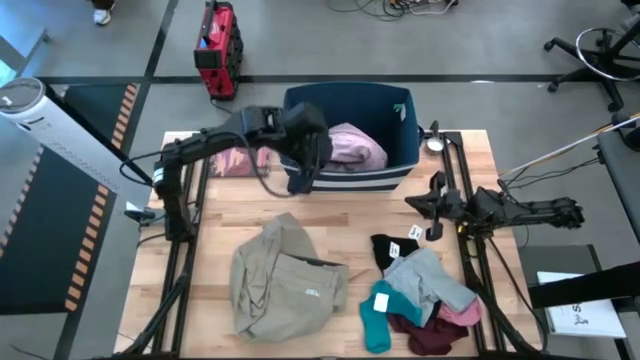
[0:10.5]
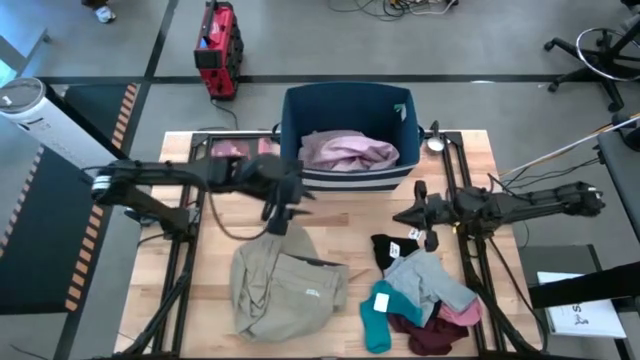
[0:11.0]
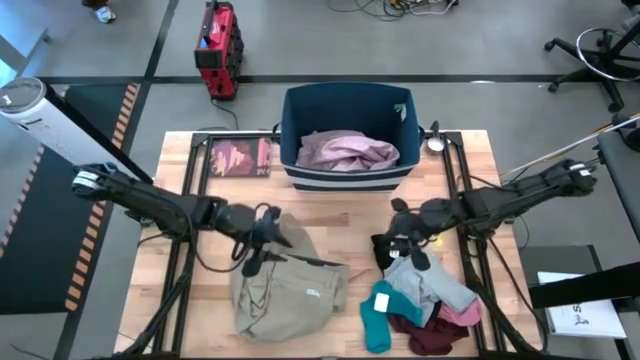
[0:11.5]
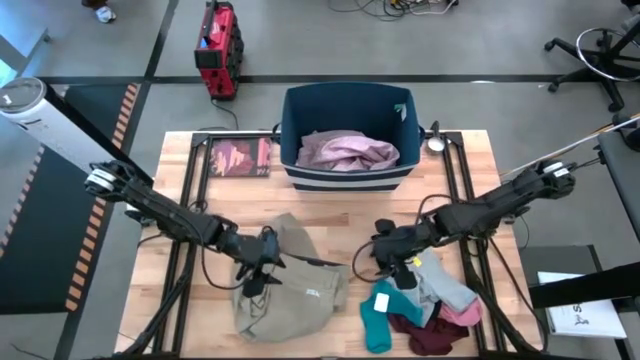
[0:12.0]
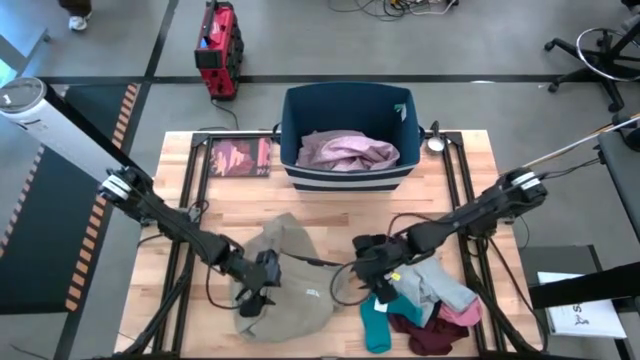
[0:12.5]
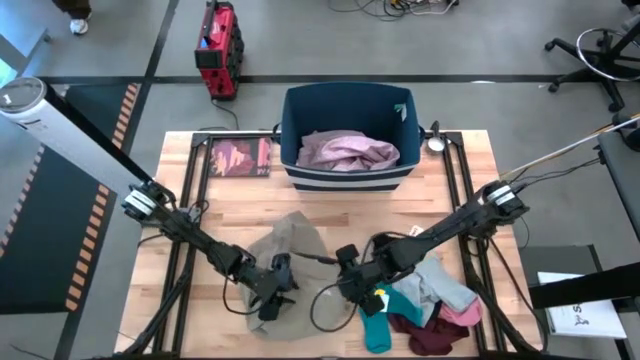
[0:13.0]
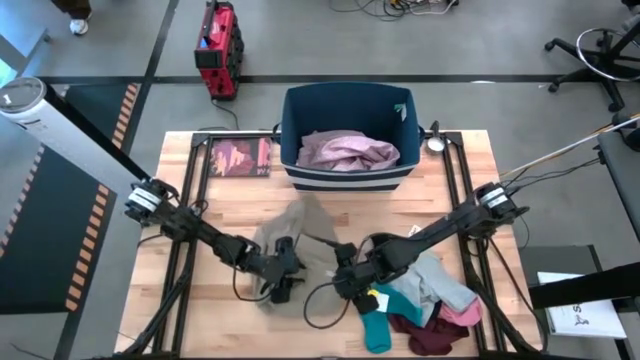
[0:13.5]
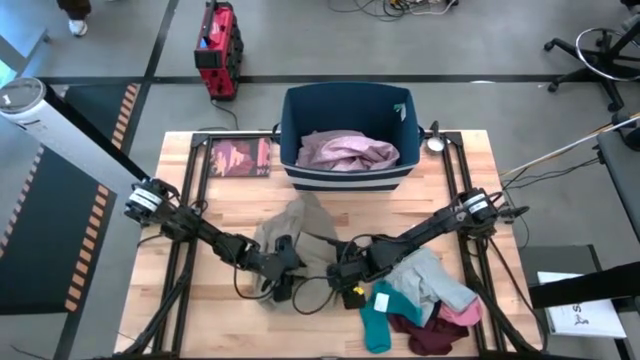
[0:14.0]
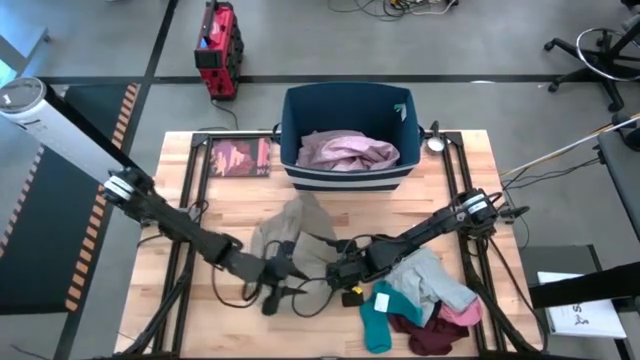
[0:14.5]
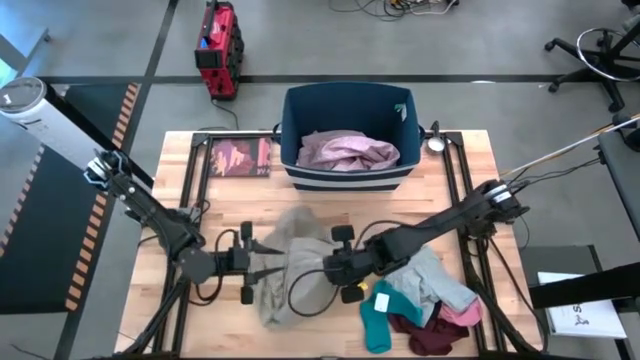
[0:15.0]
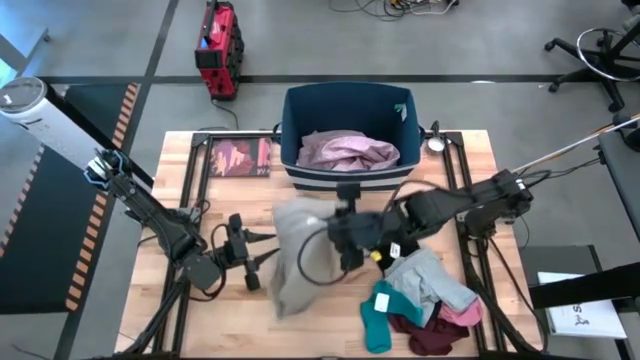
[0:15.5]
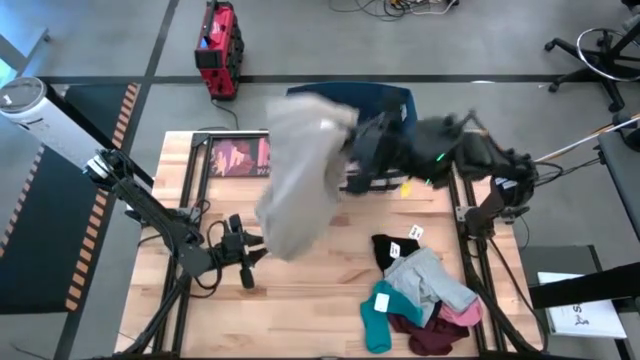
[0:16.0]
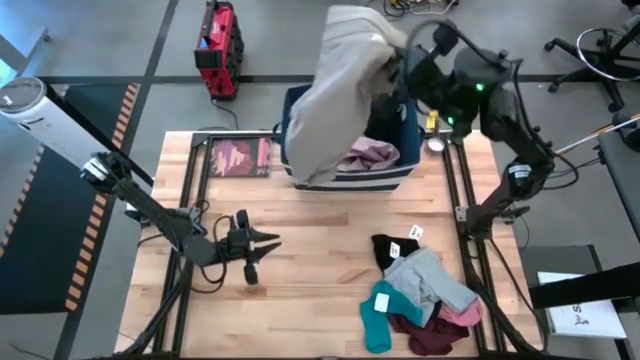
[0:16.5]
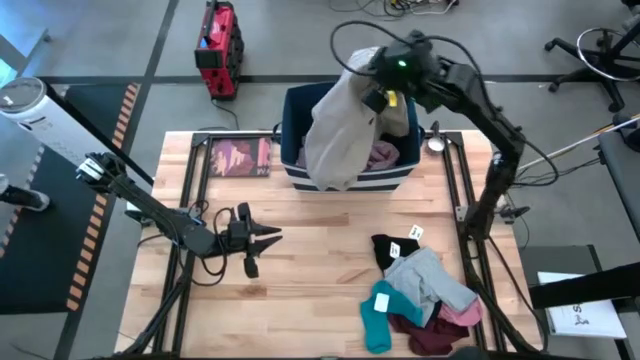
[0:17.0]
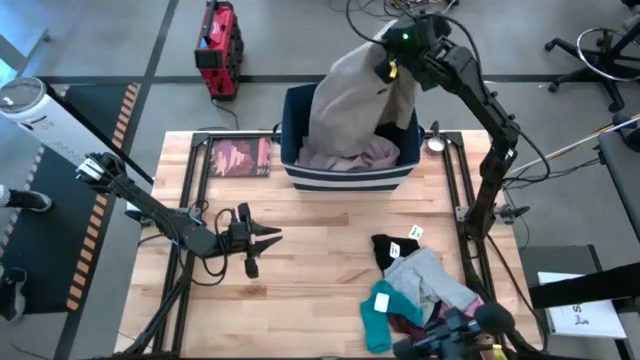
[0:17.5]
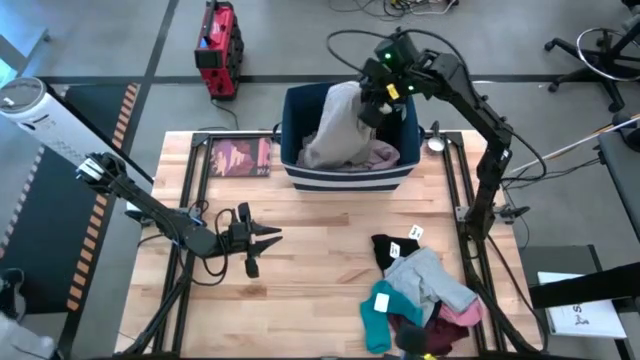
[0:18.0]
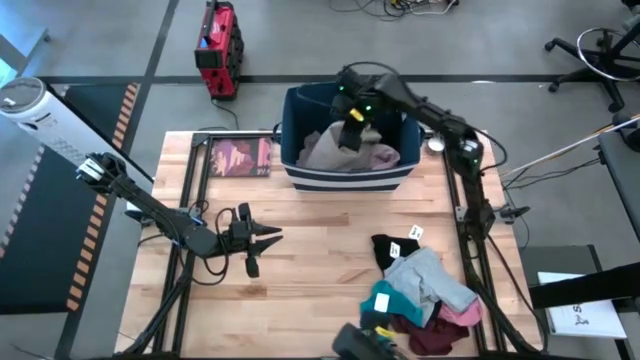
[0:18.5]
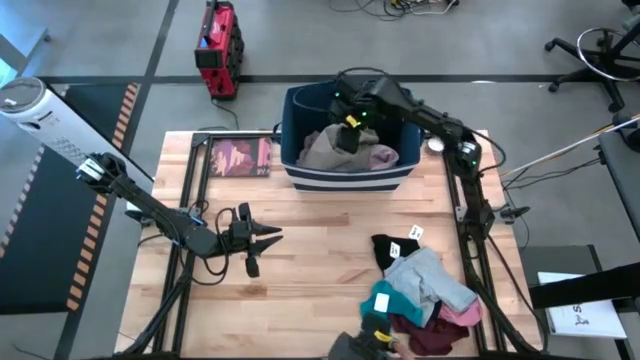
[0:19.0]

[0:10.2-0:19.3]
Task: Sort clothes
Put the light brown pants into the blue bin

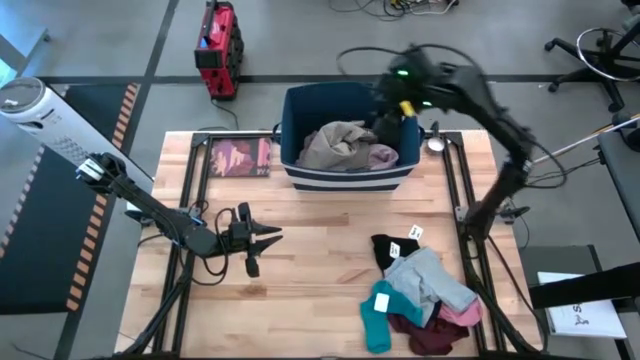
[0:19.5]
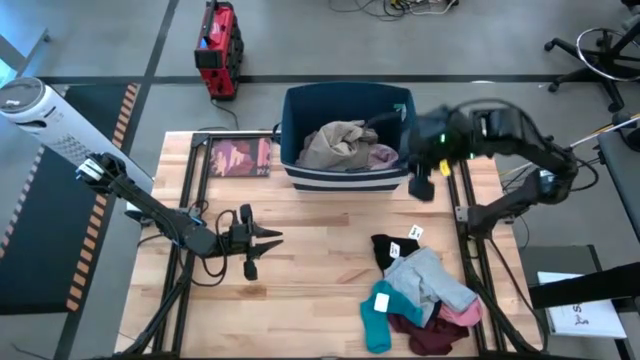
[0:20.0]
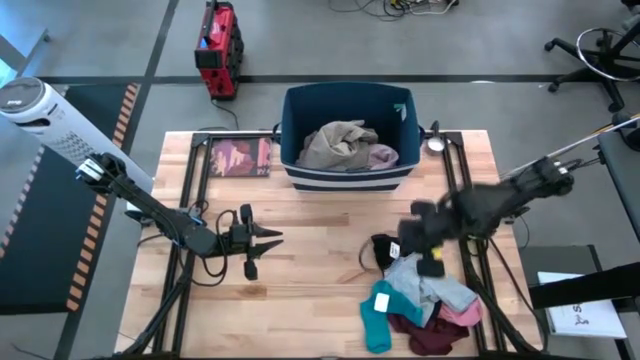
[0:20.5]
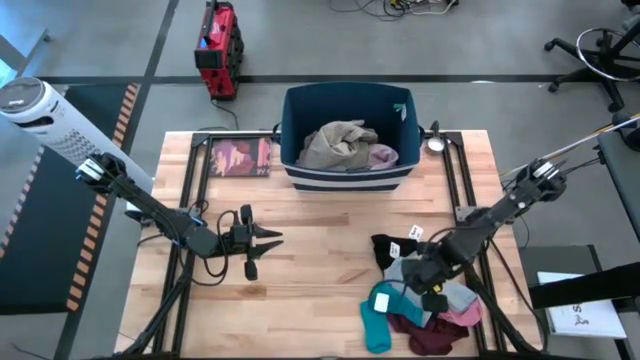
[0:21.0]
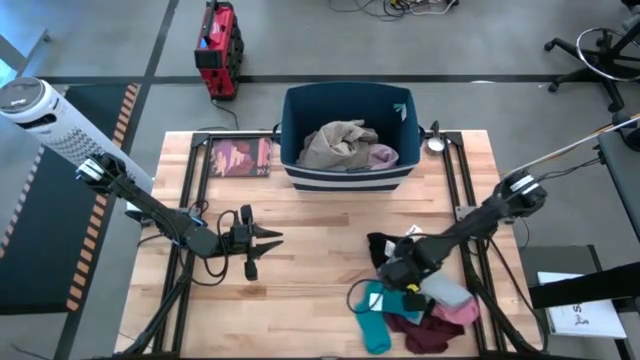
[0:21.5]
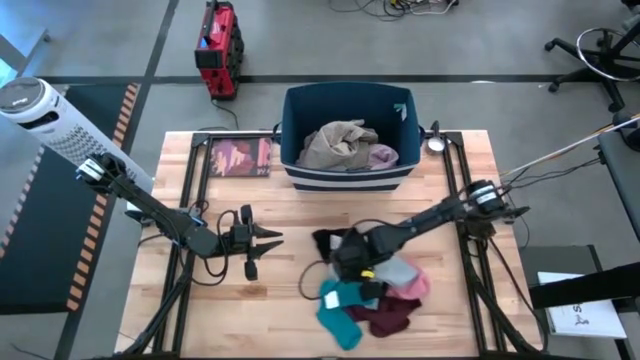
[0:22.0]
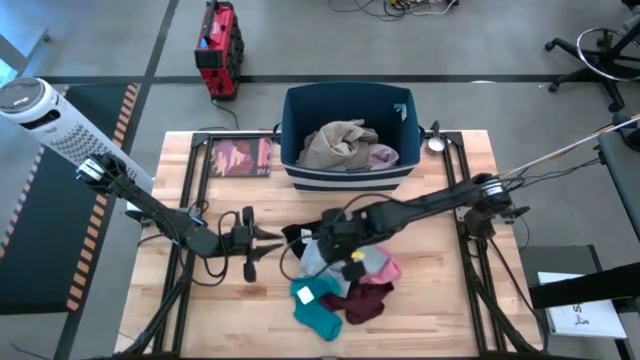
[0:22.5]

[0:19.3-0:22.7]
Adjust the clothes on the table

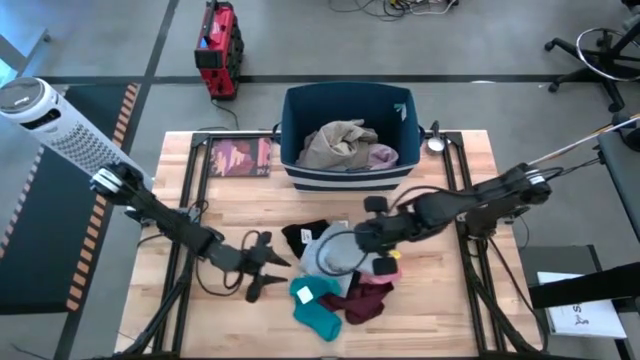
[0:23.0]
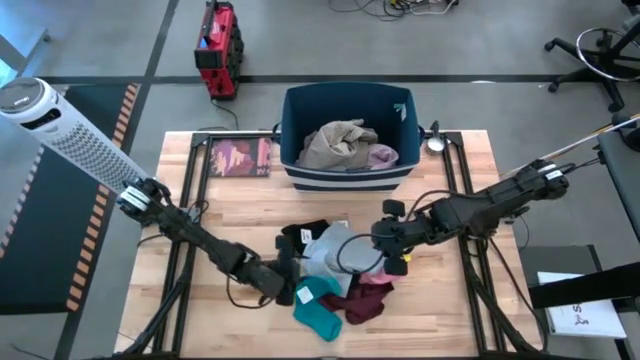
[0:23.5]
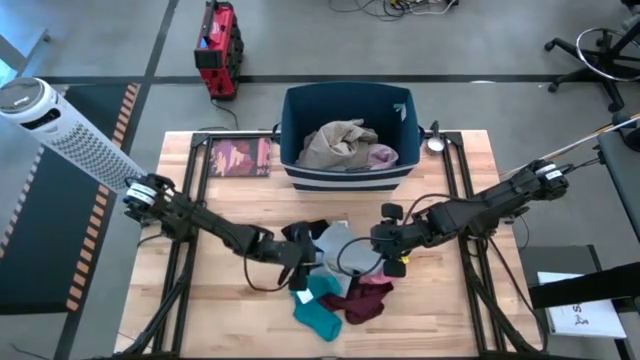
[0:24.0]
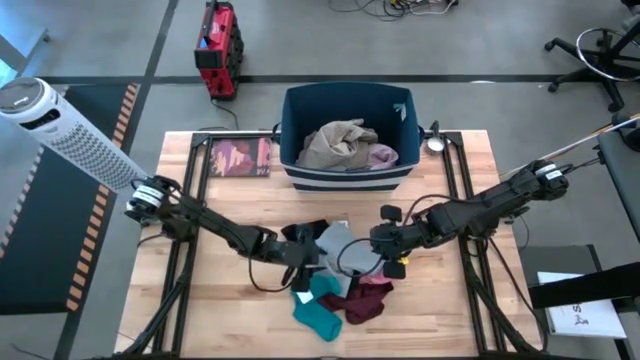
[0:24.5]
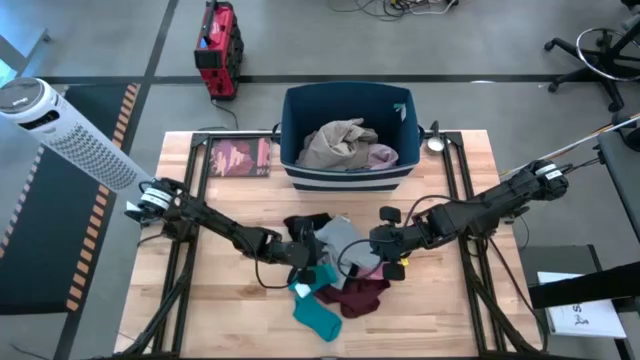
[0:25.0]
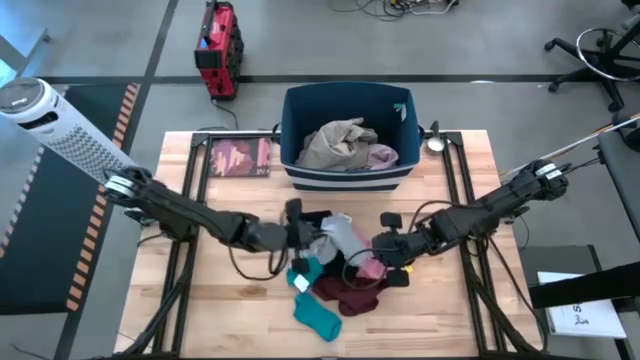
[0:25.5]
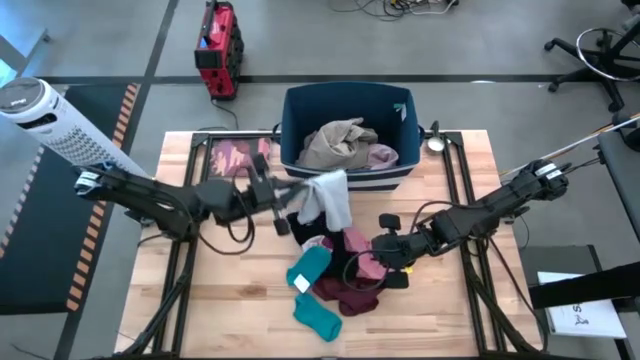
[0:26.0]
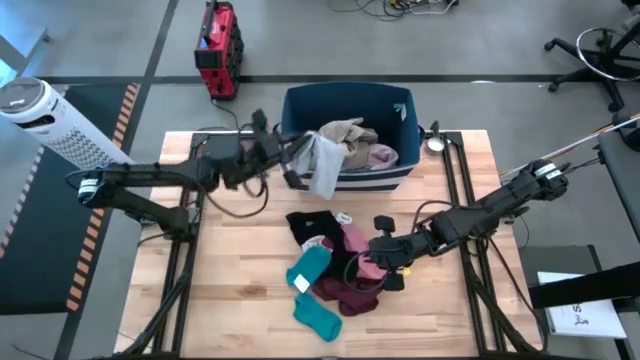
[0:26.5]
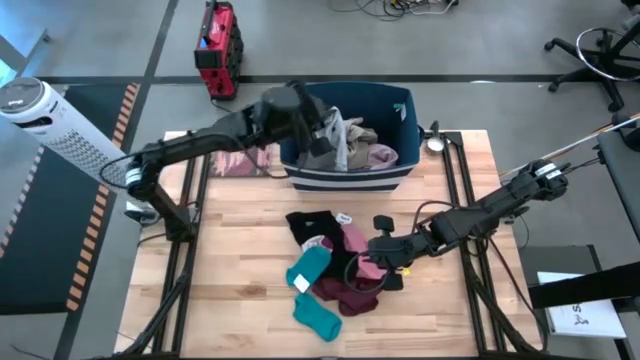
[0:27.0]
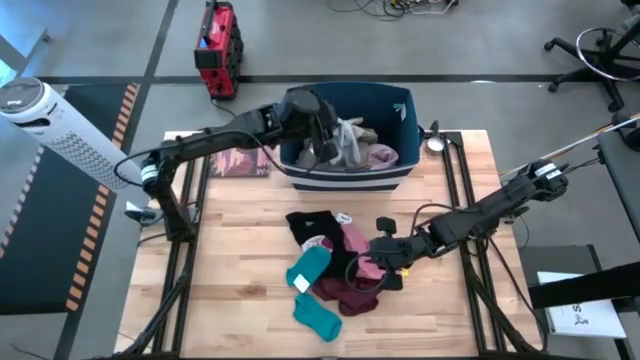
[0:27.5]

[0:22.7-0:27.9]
Put the gray shorts into the blue bin

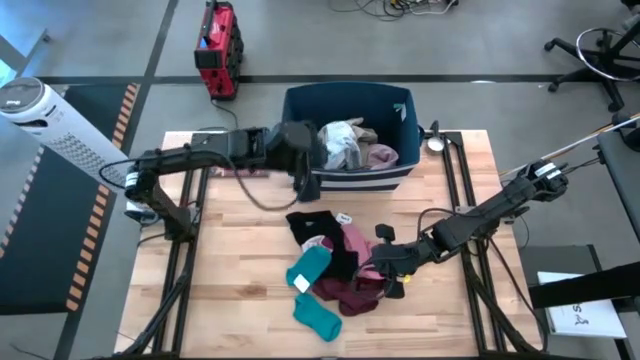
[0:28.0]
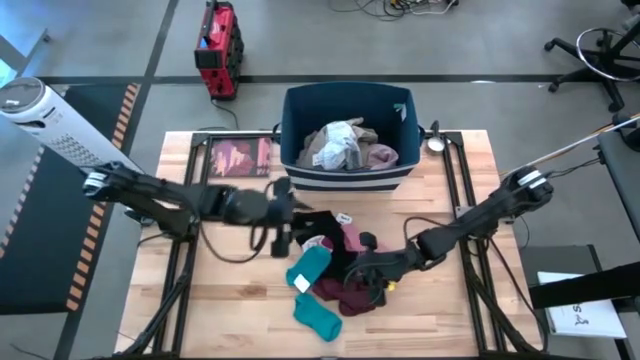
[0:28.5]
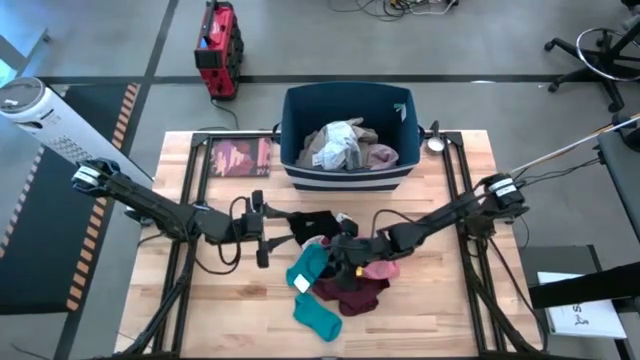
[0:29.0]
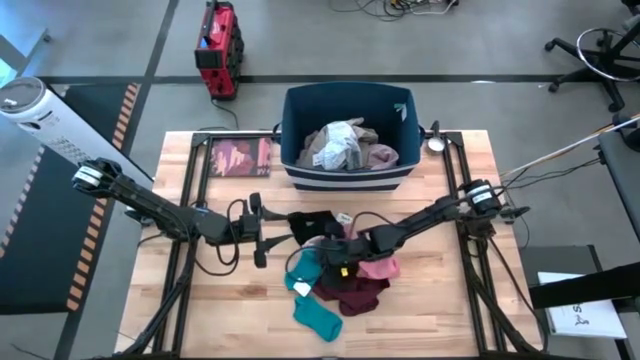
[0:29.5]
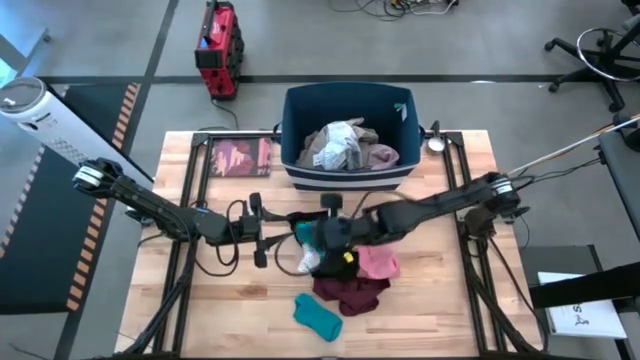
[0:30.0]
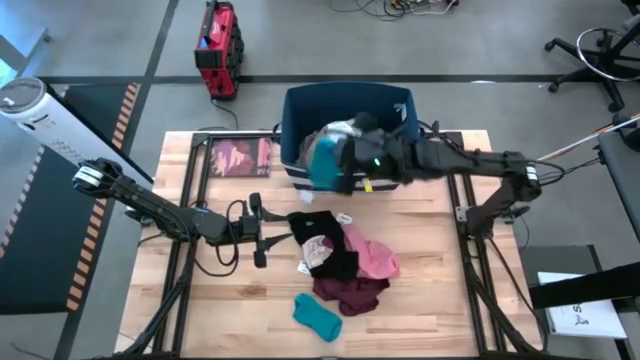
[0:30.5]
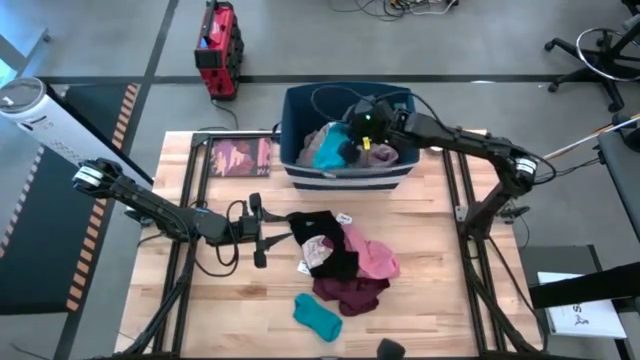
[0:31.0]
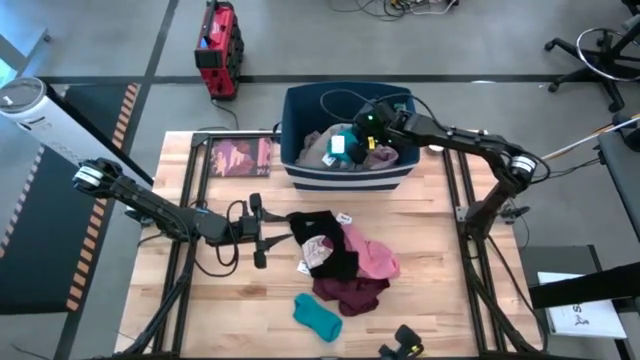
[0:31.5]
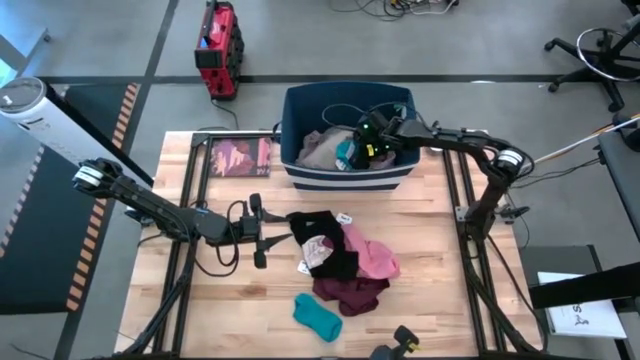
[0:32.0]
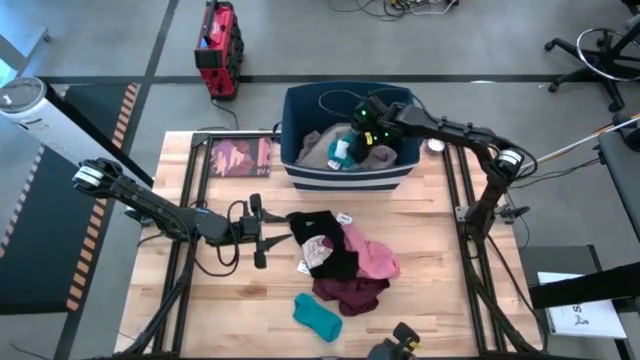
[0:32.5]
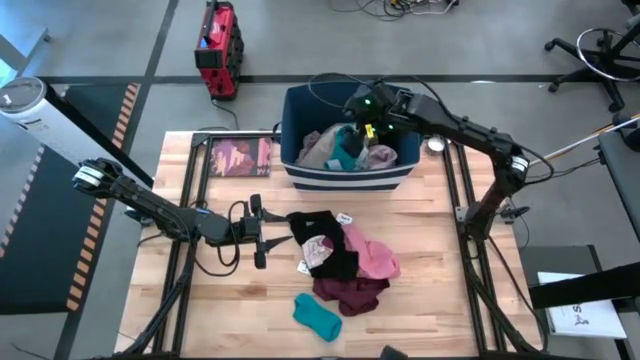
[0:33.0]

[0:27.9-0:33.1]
Put the blue sock into the blue bin
